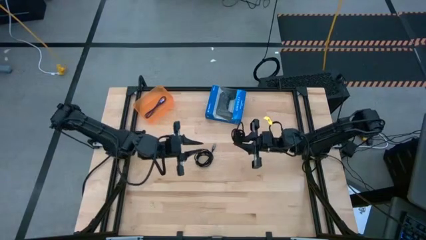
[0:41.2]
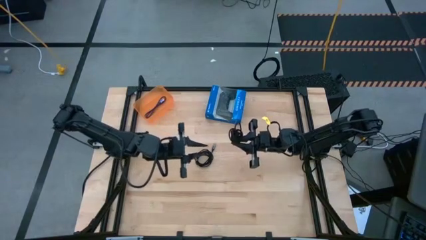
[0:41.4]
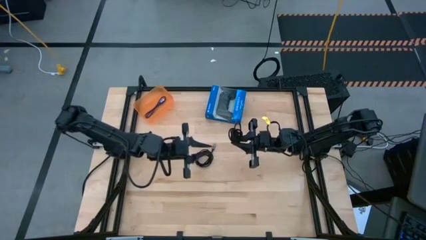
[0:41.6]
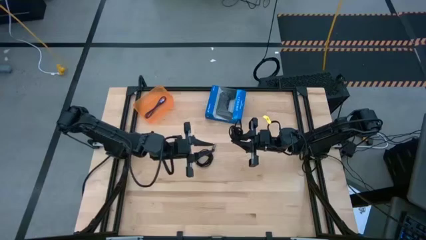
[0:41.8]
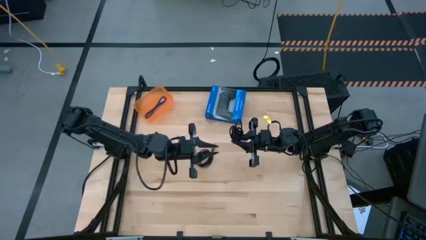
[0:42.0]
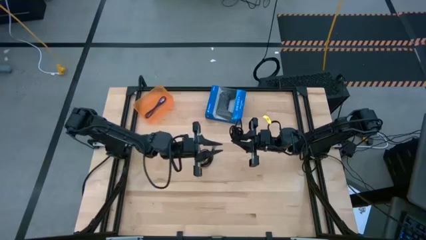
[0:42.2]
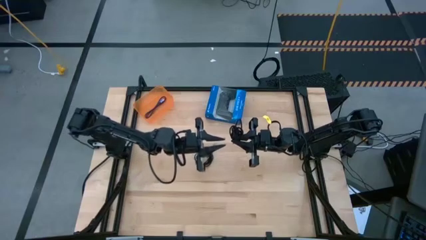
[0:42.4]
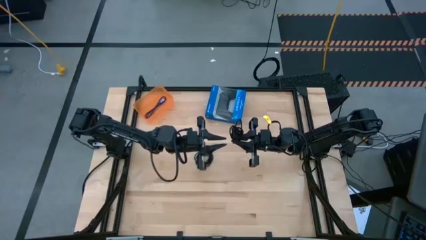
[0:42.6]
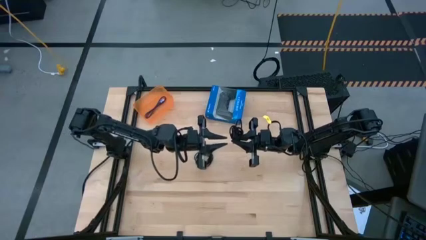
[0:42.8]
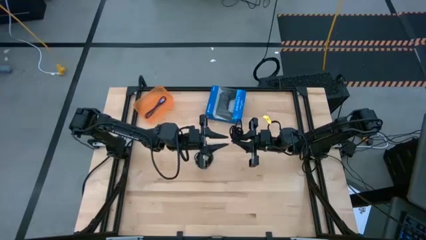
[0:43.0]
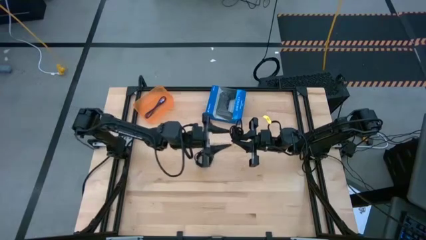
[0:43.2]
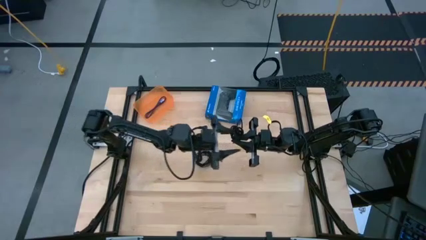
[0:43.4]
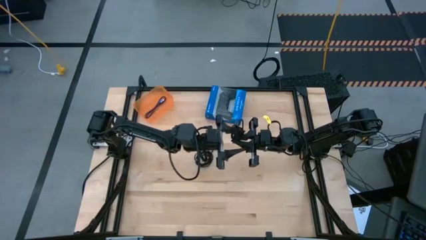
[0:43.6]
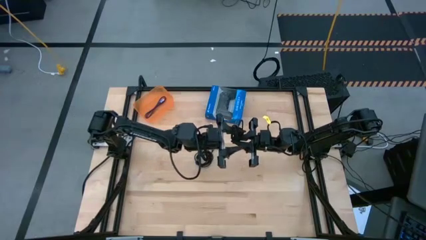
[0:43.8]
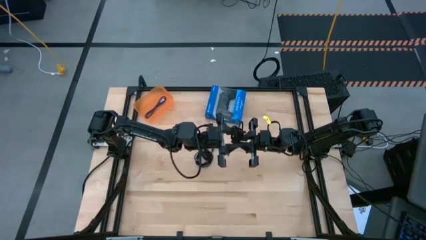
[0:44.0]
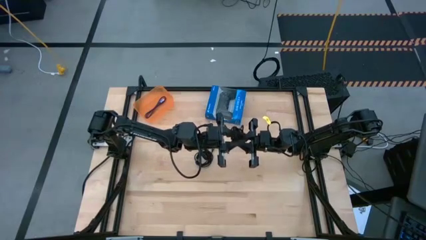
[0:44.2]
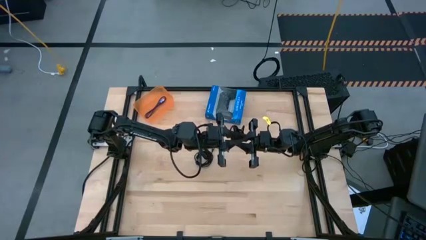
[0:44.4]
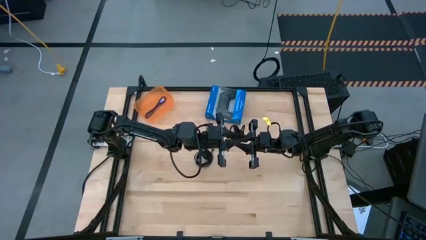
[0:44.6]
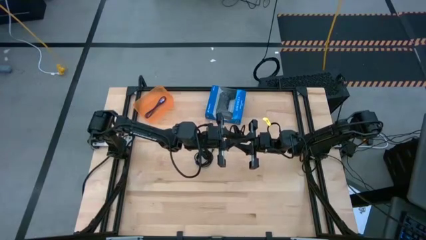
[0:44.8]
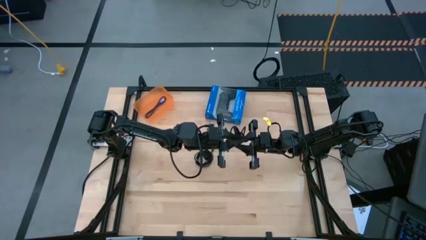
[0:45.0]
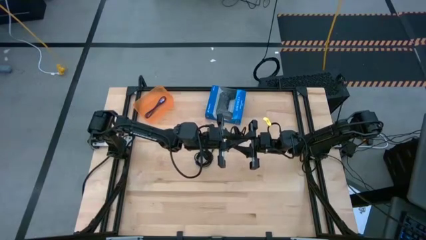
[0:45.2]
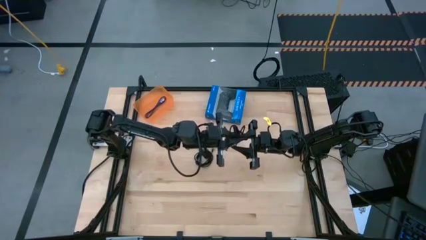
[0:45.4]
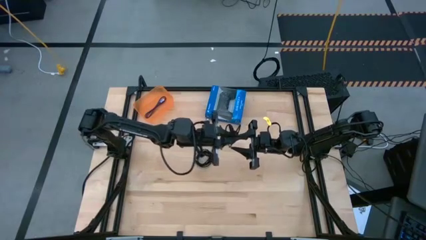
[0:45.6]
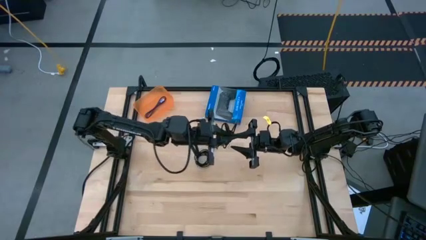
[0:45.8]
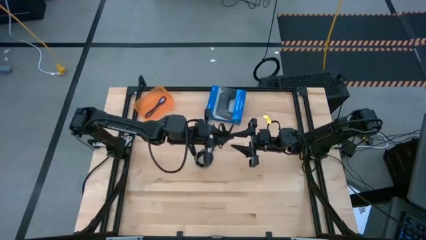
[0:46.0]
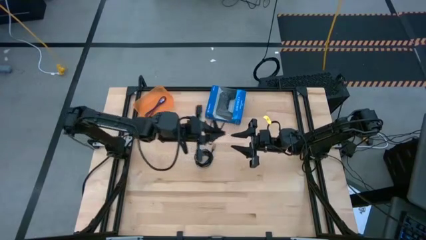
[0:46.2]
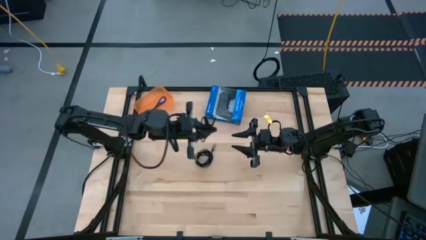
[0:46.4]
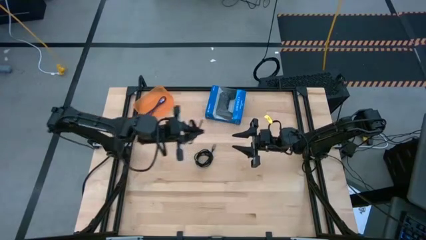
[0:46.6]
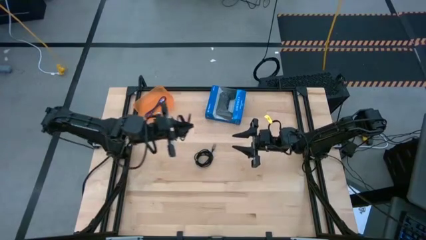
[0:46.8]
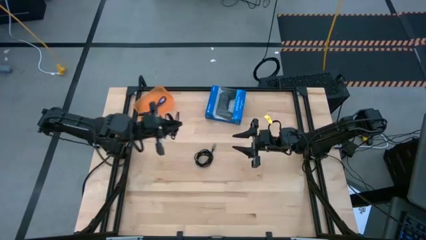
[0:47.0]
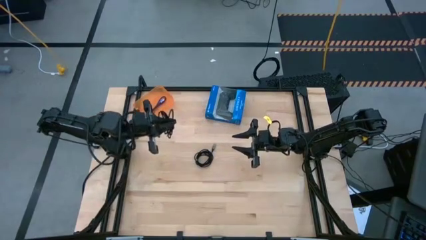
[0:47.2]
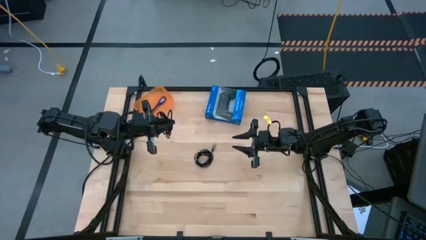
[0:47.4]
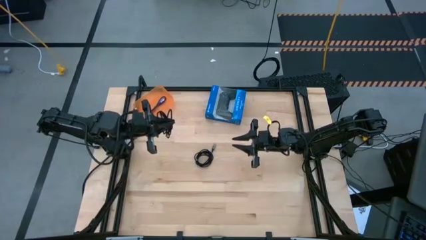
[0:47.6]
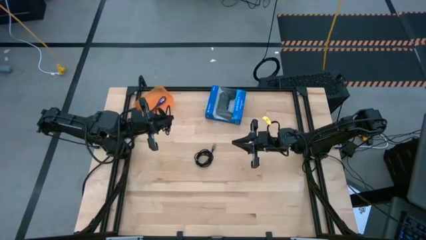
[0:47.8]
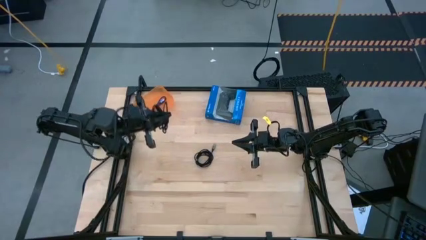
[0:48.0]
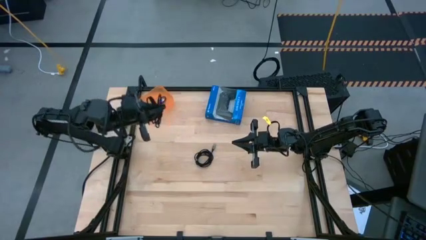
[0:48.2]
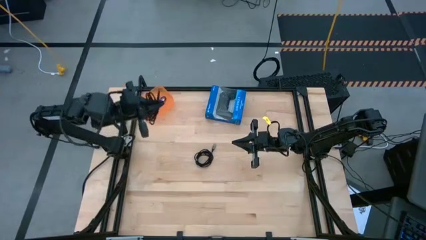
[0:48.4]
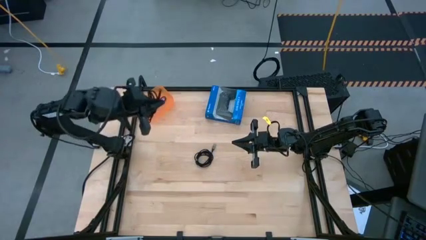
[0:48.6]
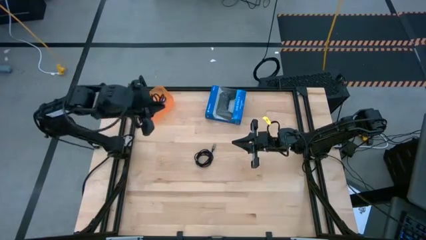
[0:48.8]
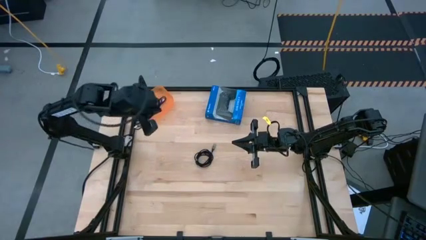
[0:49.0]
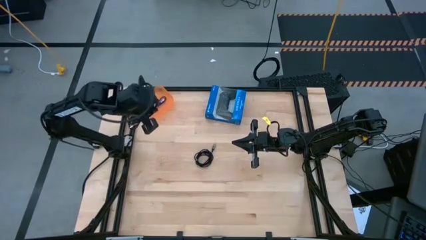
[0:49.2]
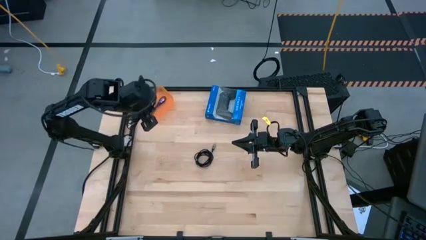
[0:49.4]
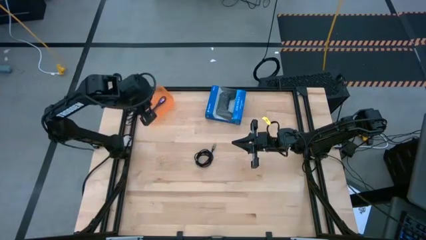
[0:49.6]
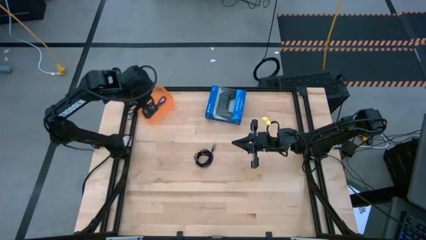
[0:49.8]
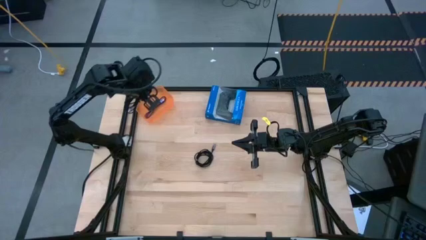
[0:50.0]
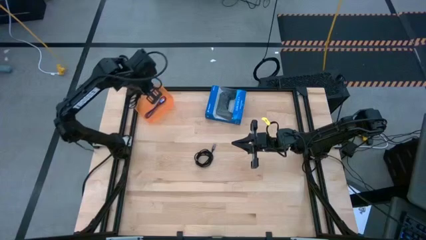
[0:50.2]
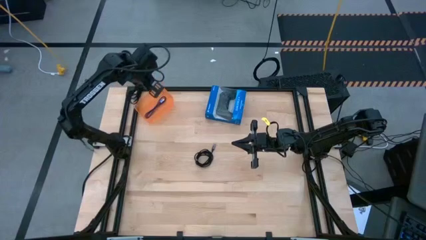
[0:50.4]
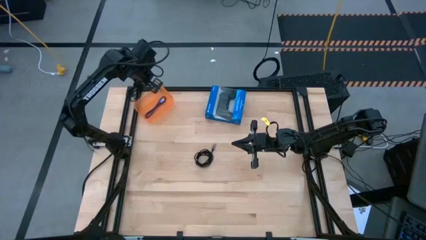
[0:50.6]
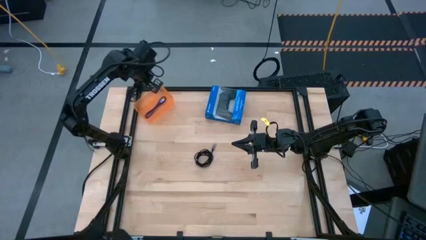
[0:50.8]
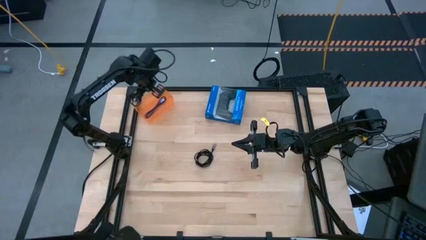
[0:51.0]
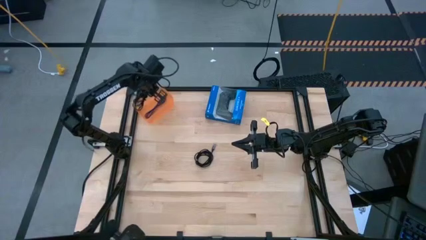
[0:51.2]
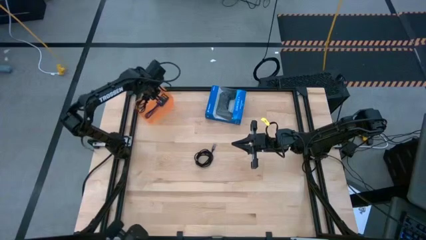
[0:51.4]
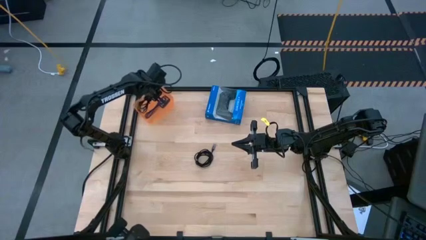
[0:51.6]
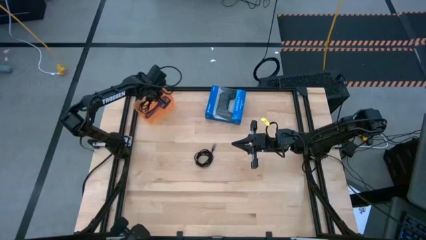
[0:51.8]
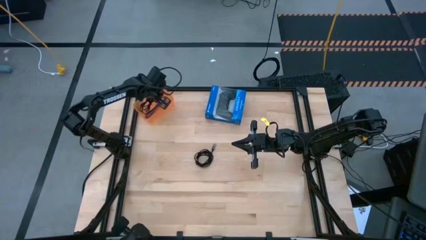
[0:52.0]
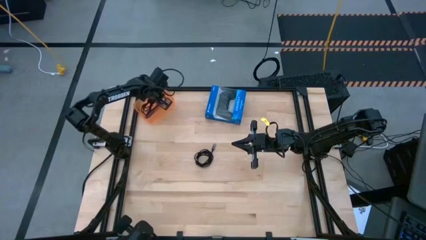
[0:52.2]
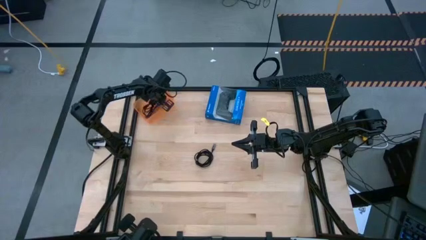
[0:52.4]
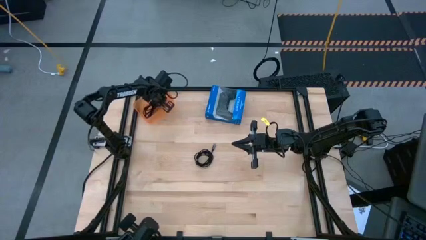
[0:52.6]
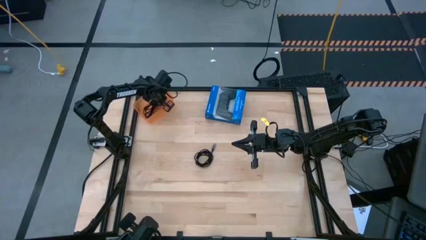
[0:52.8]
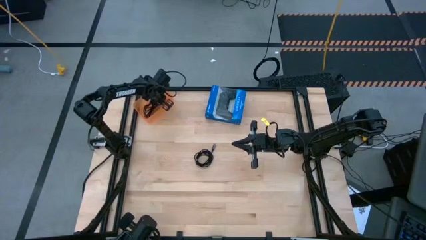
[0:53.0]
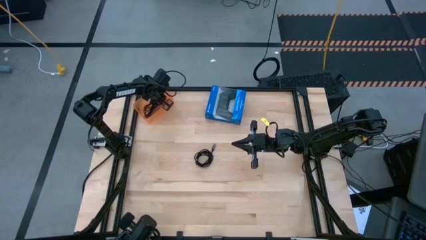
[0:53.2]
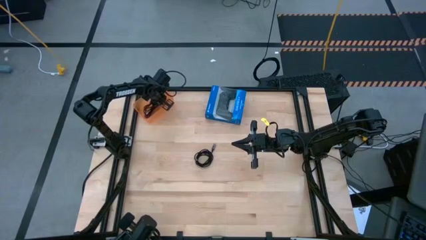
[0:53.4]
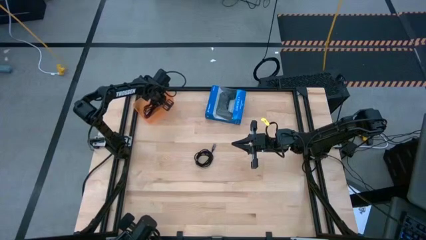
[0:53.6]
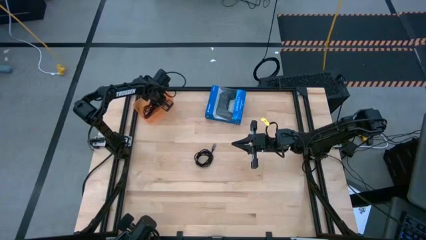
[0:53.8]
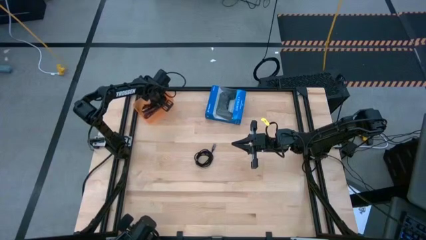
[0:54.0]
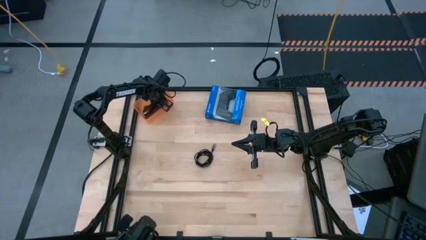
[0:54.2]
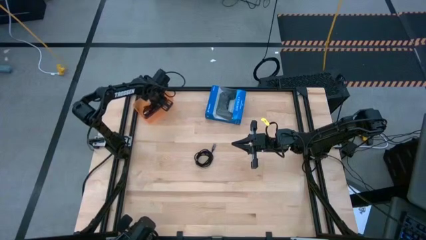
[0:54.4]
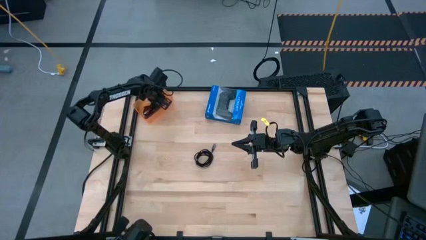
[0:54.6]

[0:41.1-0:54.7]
Task: Pick and place USB-C Cables
Put the bottom black charger cable into the orange bin

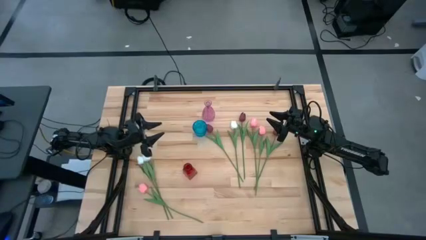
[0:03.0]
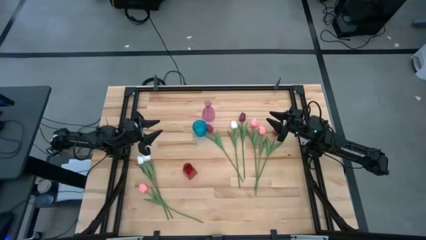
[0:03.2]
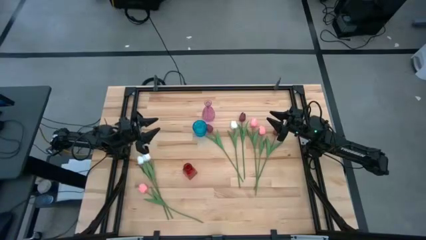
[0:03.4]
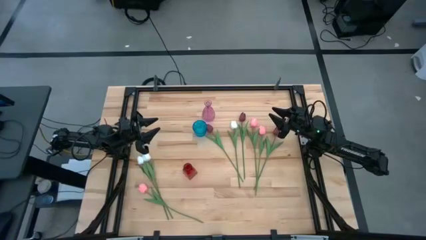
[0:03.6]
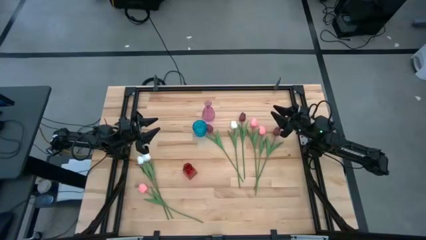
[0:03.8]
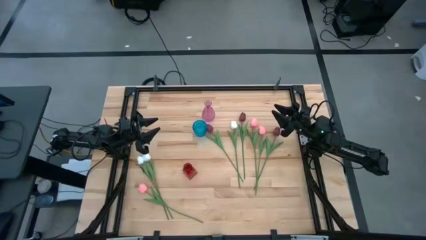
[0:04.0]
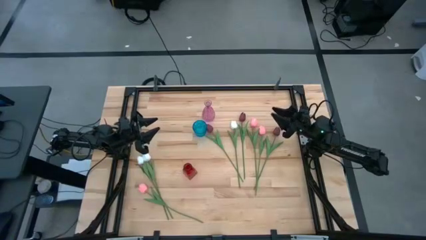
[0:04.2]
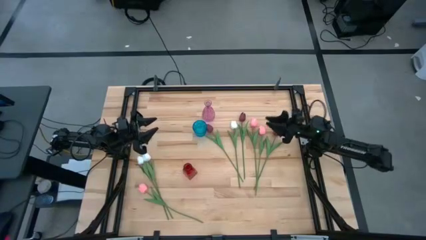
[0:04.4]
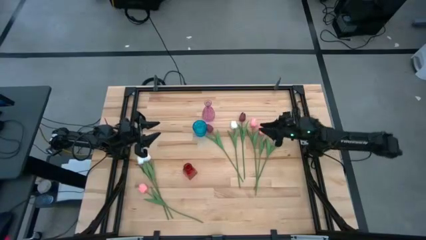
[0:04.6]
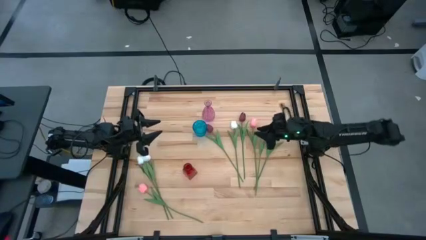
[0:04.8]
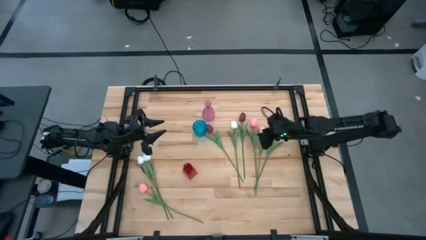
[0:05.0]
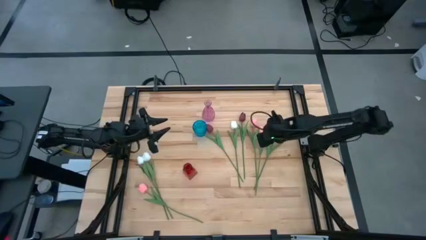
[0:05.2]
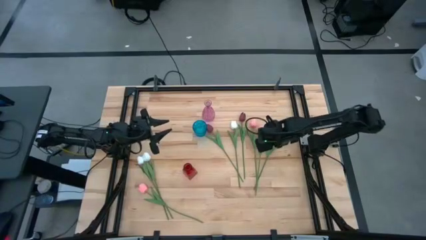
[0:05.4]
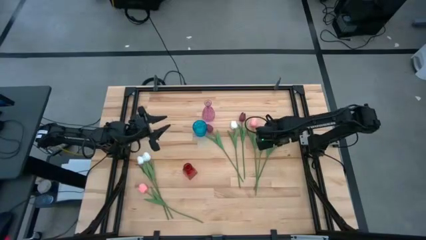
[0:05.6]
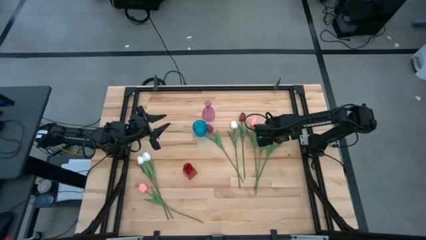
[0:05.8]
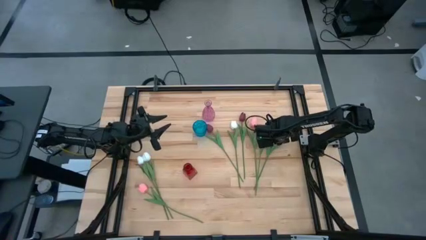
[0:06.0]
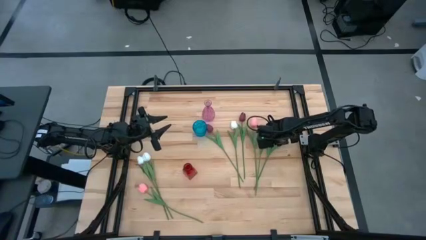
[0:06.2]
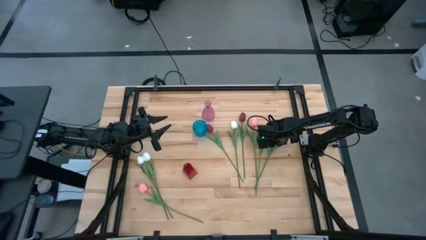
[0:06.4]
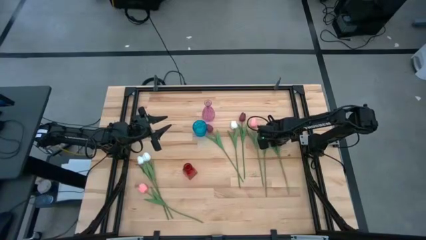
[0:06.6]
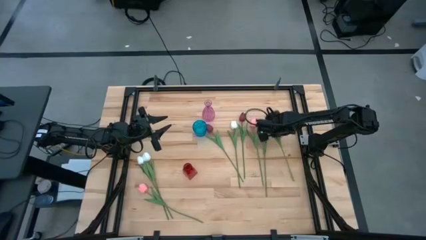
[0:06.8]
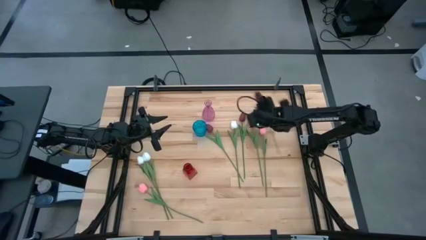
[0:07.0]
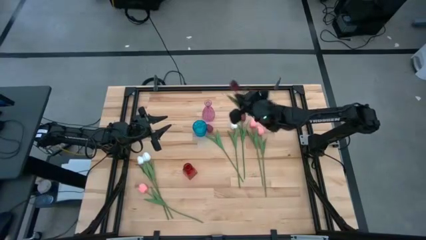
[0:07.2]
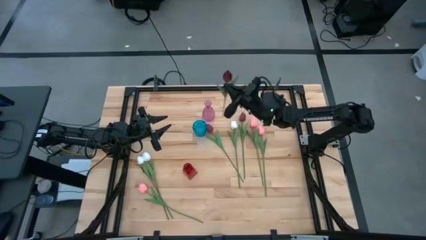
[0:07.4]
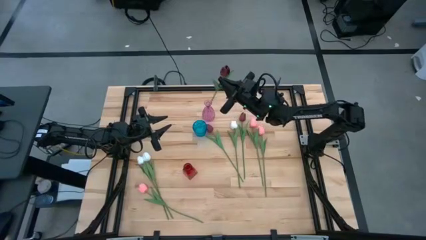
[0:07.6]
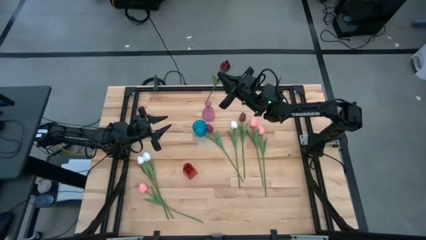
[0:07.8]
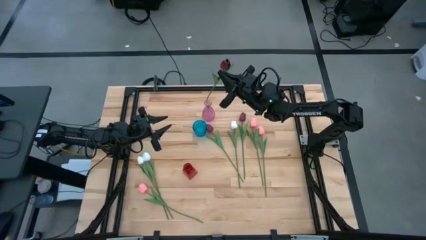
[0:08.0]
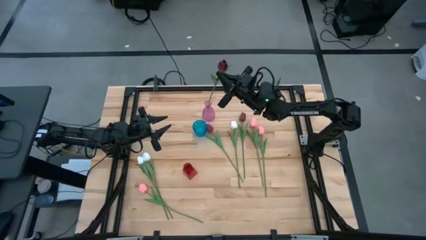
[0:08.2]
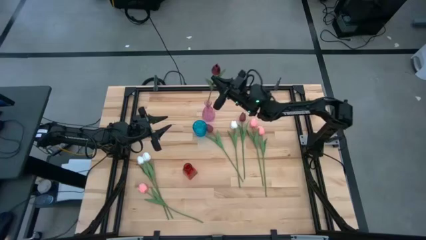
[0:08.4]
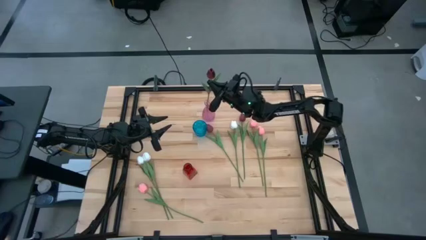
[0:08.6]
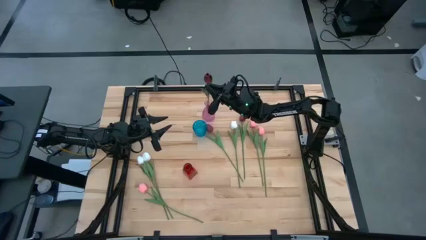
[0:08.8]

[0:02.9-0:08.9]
Task: Sort flowers into vase by color
Put the red flower into the pink vase
